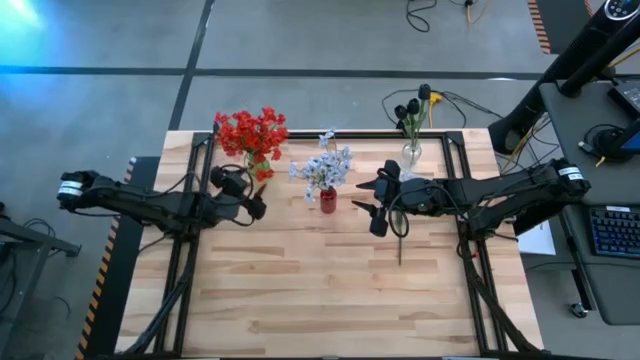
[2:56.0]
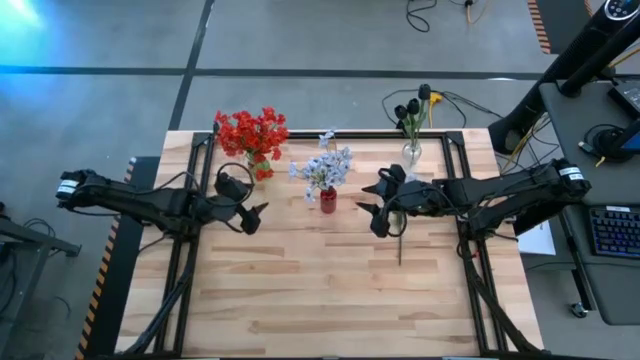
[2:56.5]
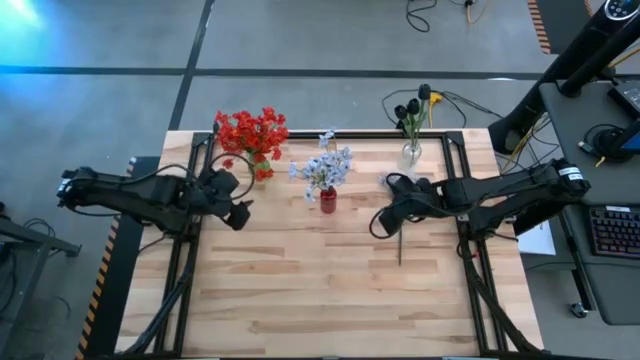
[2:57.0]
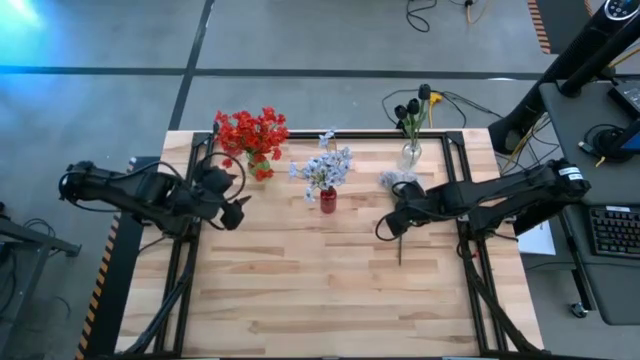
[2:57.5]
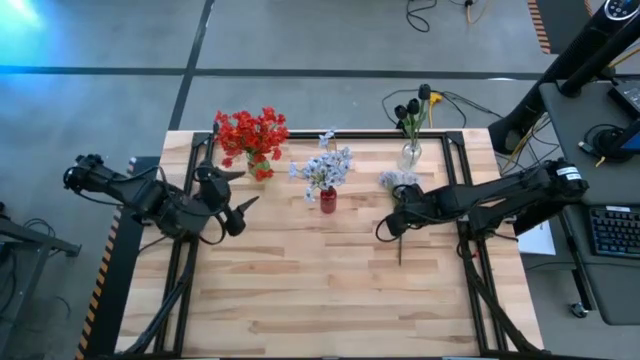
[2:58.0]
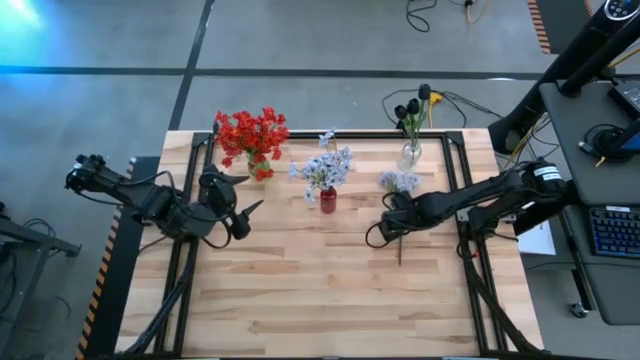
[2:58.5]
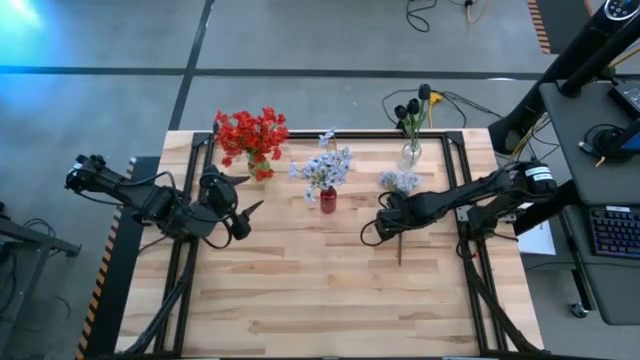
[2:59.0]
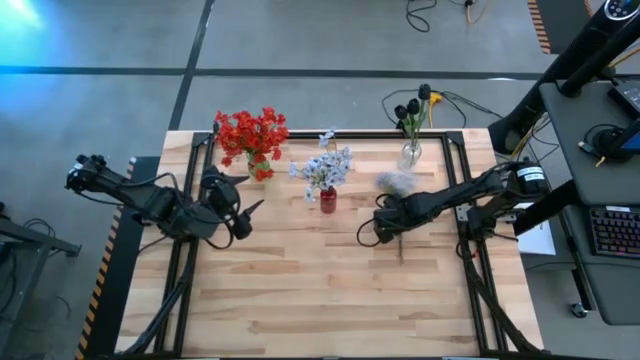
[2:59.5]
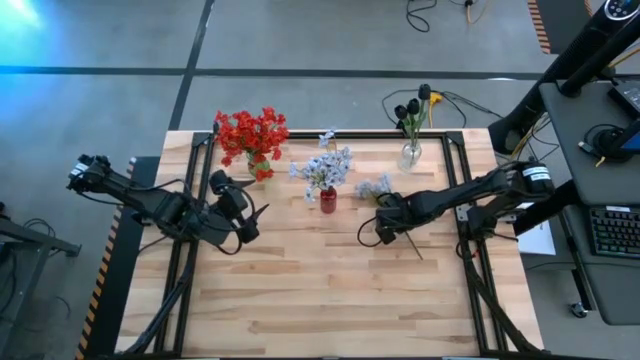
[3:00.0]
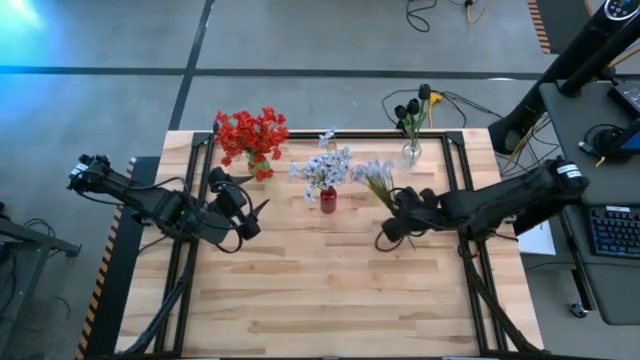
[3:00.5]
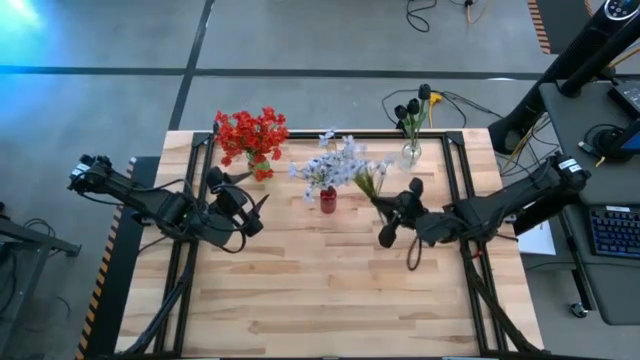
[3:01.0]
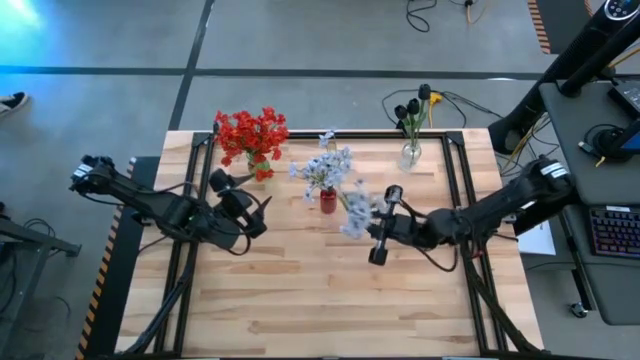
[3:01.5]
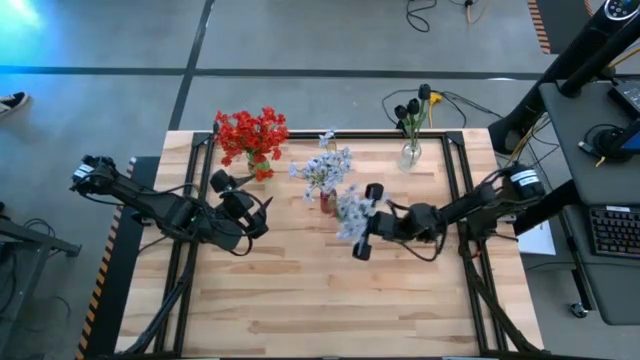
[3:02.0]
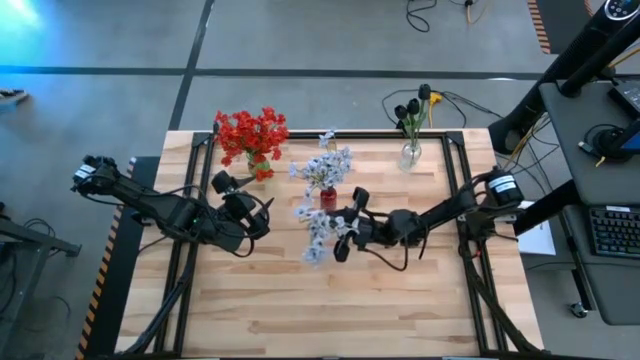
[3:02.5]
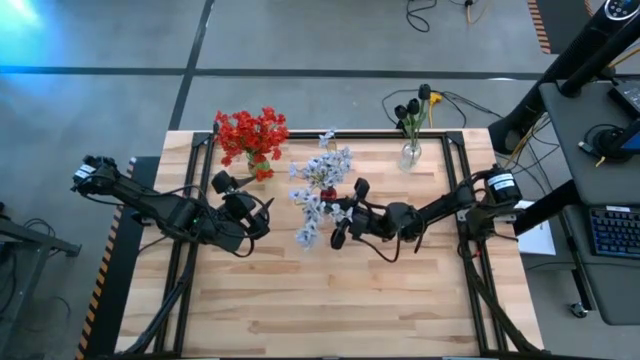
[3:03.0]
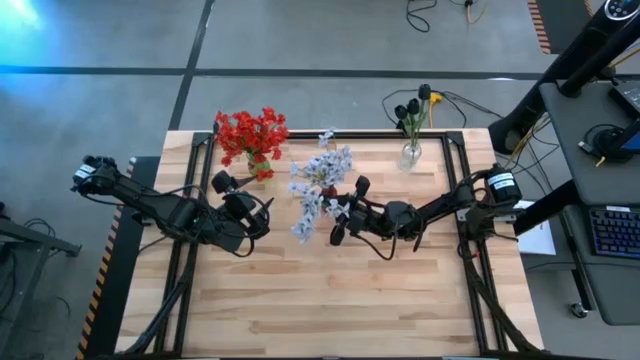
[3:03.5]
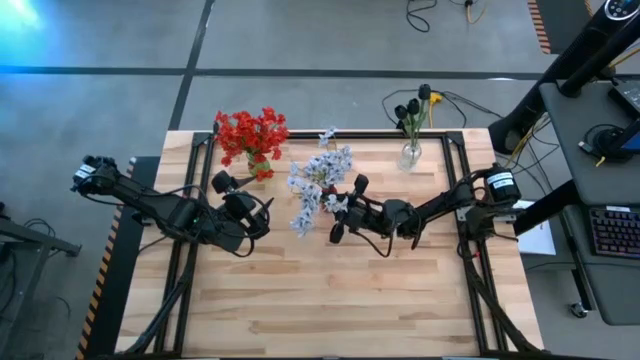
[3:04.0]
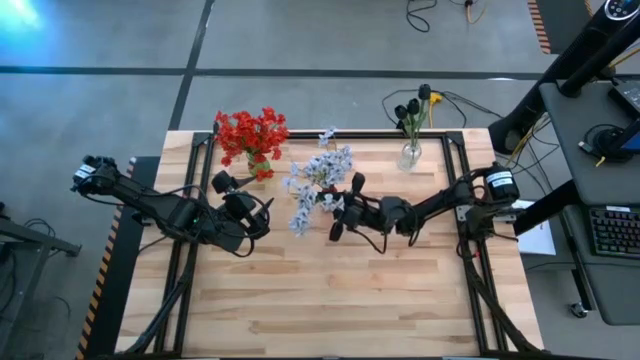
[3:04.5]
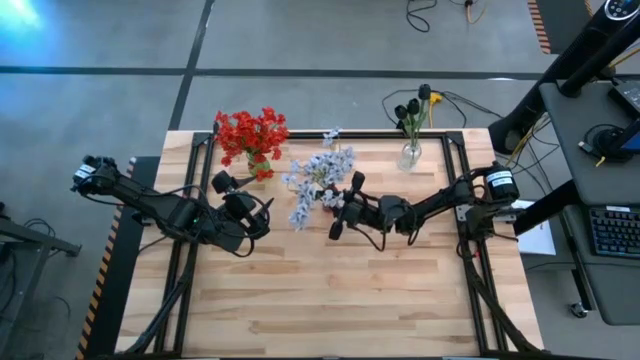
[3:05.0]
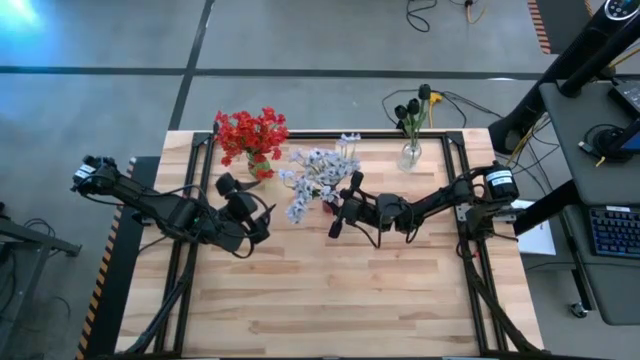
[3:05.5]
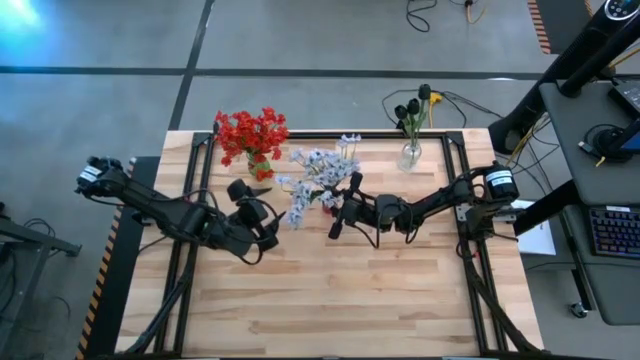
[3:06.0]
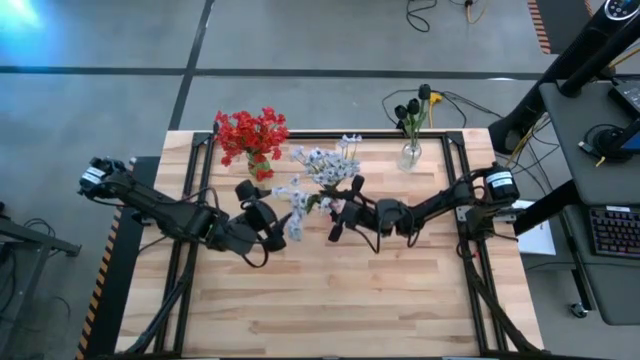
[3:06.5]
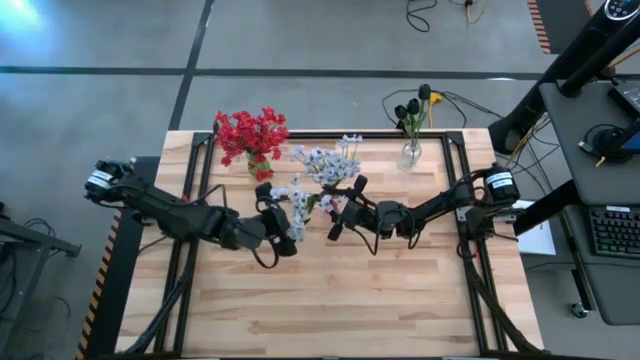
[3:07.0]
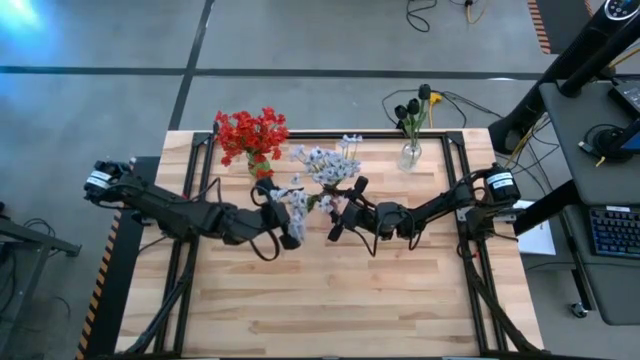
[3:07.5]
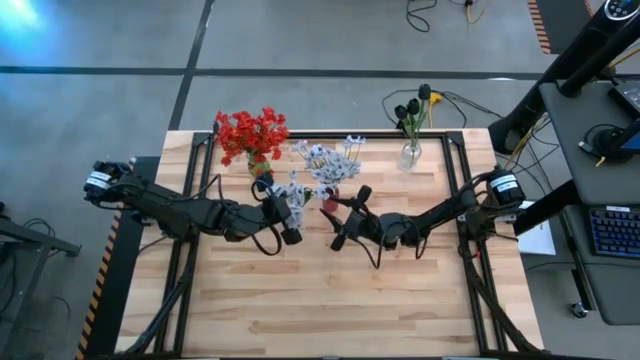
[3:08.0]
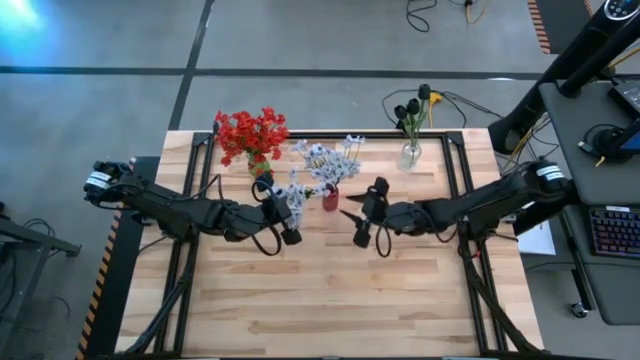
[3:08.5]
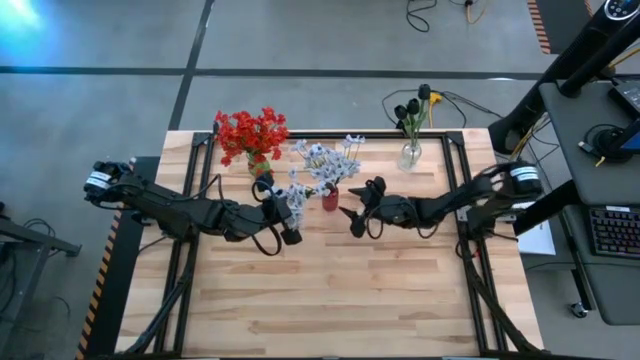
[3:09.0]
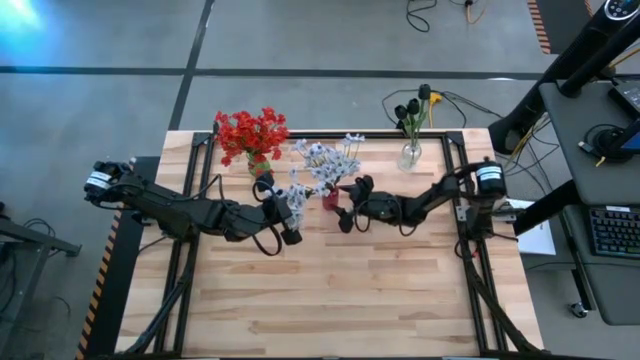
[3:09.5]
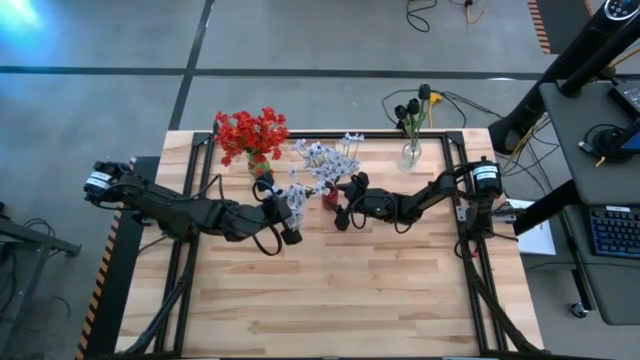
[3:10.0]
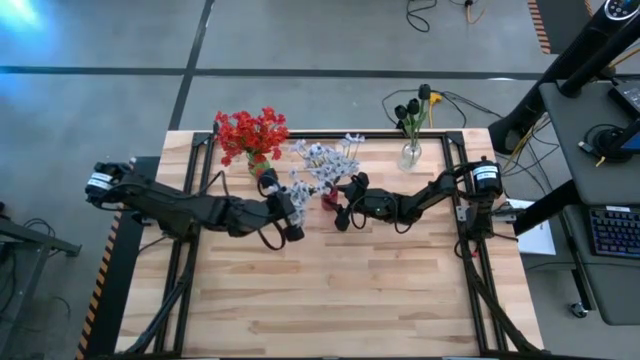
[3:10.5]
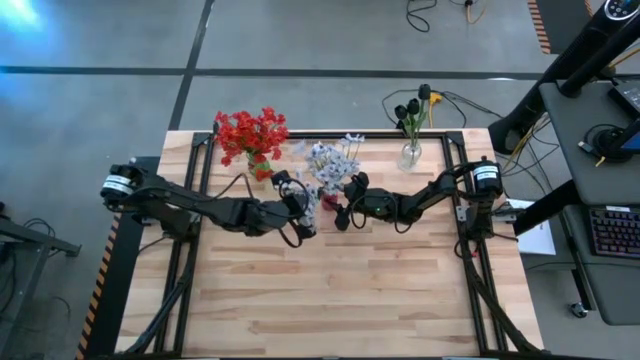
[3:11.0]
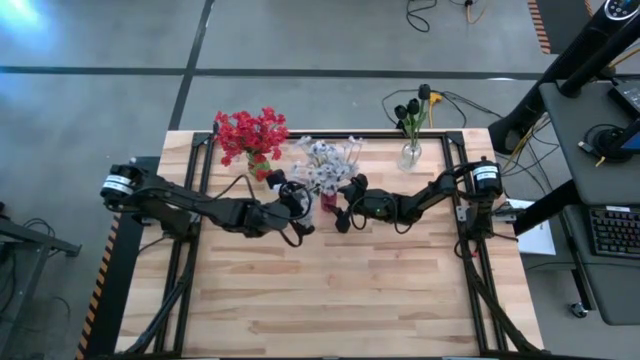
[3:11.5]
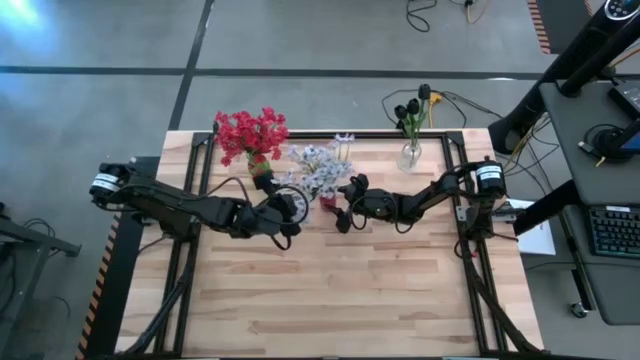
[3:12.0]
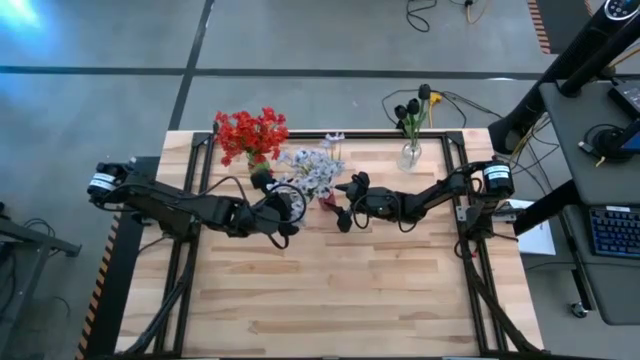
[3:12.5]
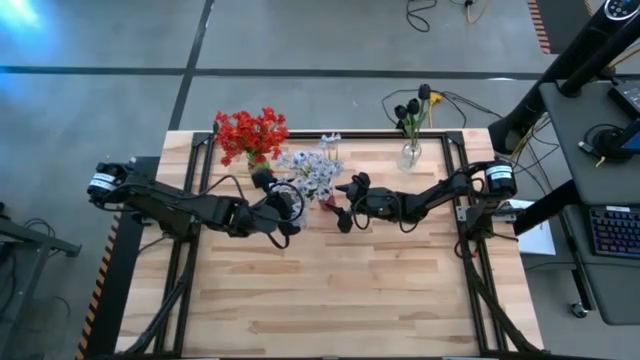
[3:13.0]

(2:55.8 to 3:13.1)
Task: Sort flowers into vase by color
Put the white flowers into the red vase

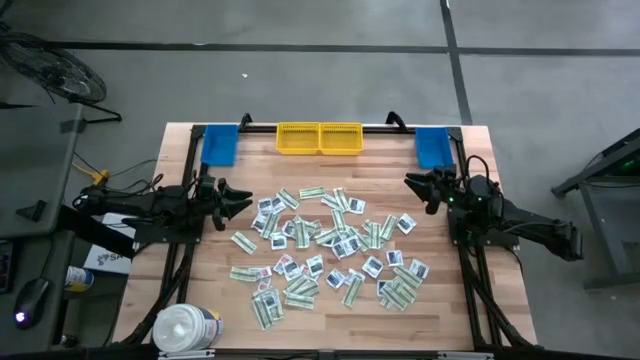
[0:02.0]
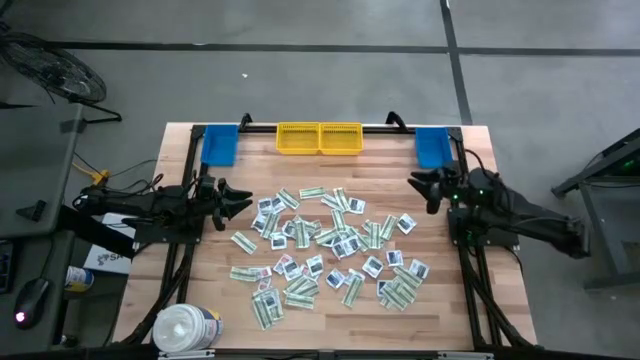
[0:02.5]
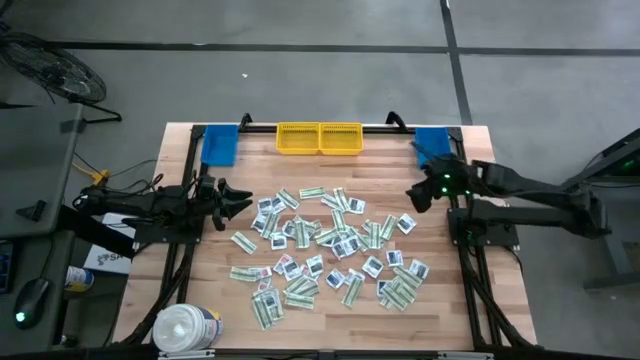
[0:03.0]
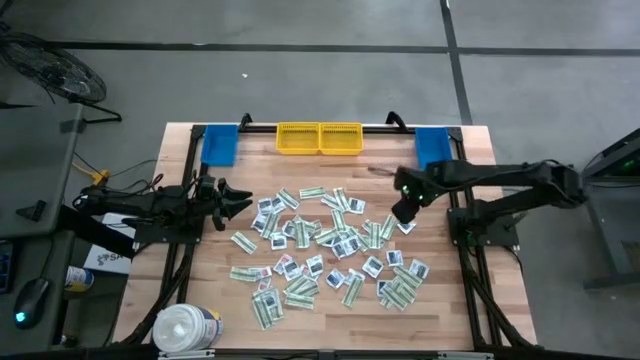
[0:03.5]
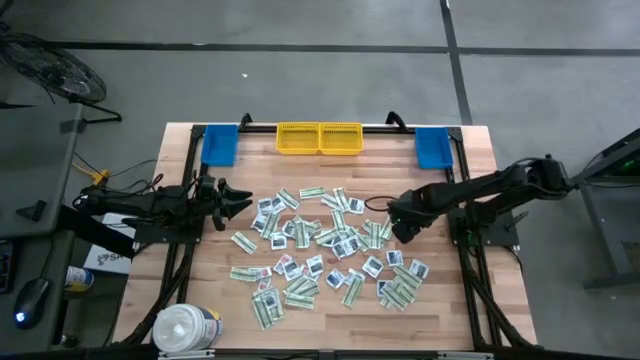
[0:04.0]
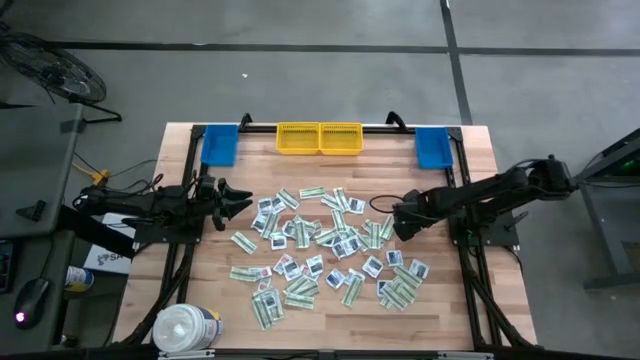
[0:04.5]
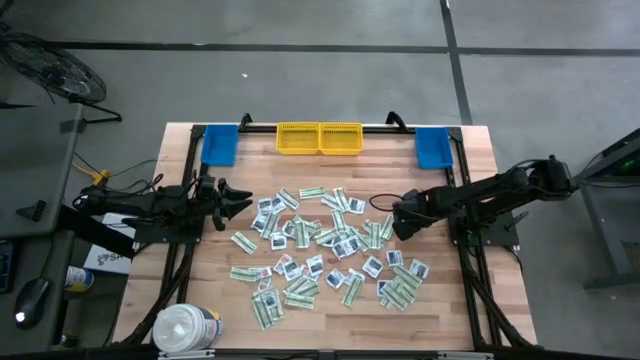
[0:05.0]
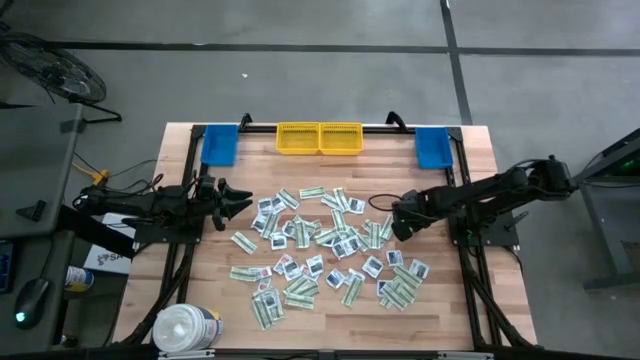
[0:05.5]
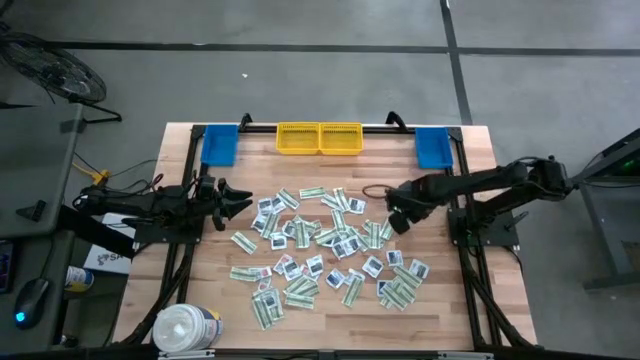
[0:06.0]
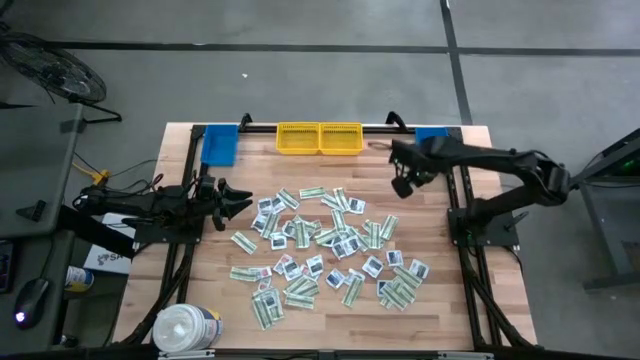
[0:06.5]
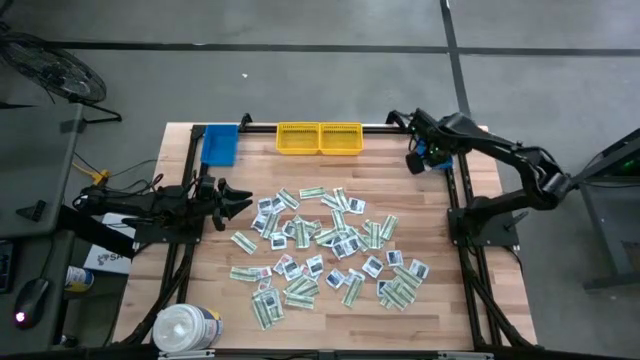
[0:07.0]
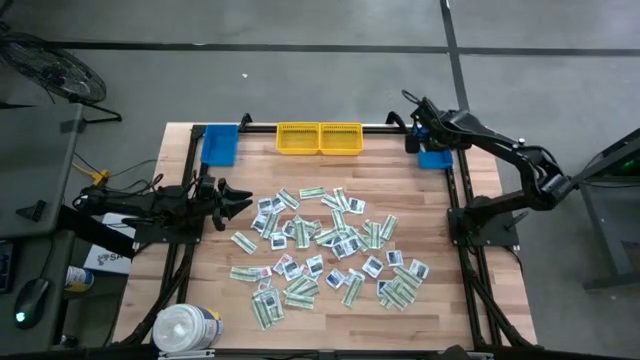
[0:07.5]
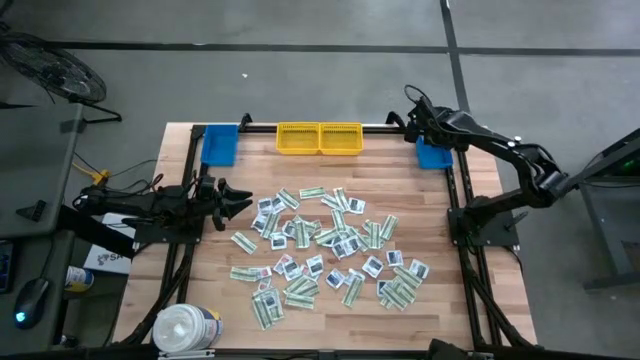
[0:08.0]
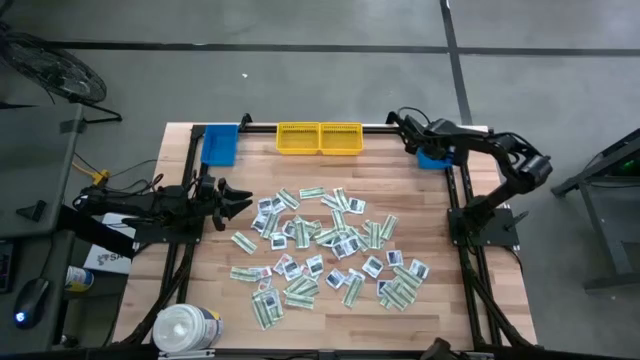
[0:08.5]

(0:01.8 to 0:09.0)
Task: Pick & Place First Aid Supplies
Put the black towelette pack into the right blue bin
